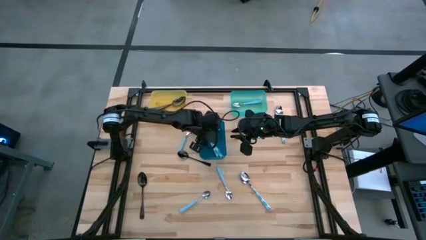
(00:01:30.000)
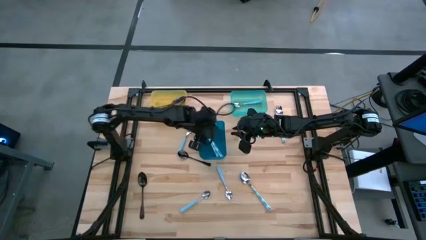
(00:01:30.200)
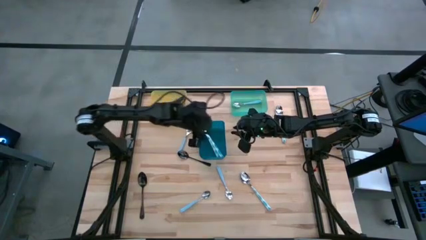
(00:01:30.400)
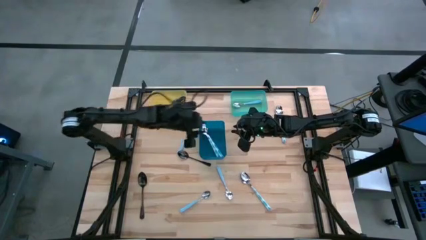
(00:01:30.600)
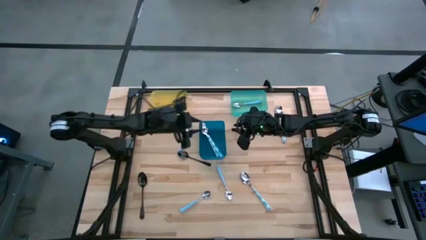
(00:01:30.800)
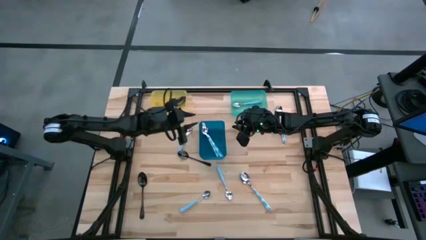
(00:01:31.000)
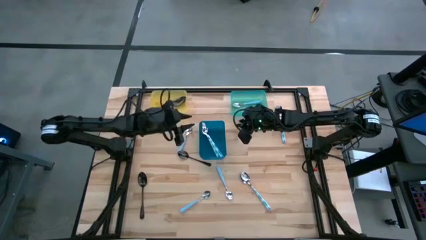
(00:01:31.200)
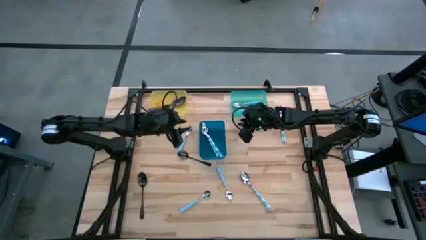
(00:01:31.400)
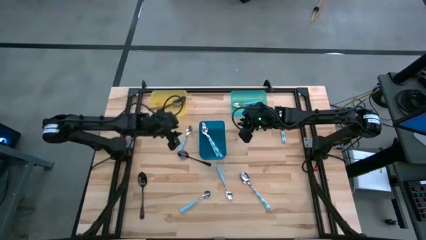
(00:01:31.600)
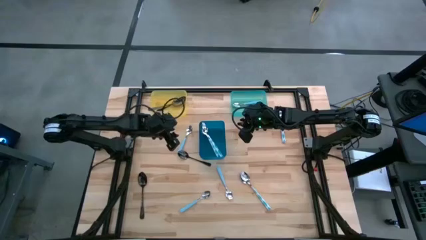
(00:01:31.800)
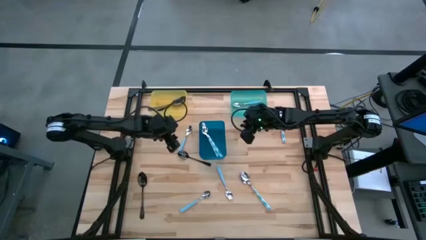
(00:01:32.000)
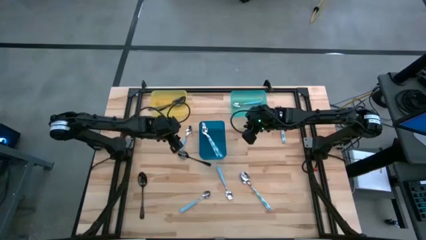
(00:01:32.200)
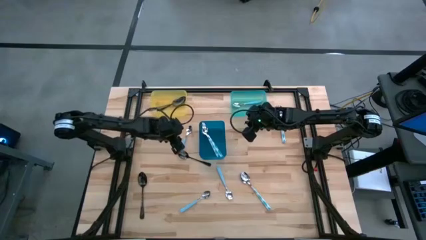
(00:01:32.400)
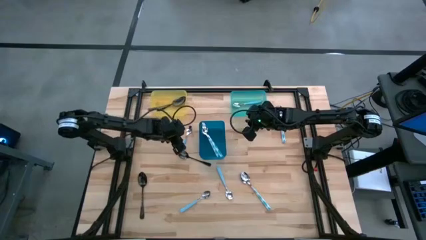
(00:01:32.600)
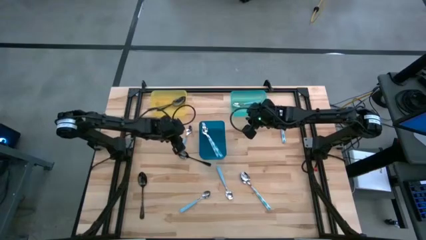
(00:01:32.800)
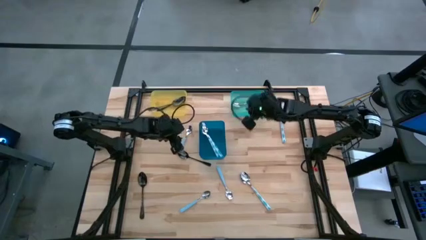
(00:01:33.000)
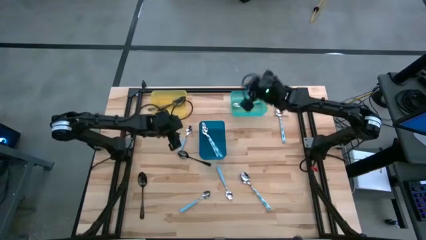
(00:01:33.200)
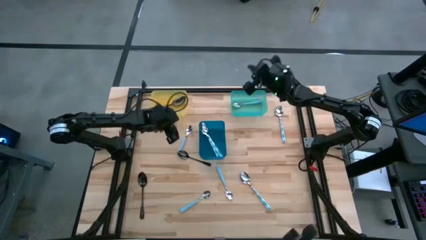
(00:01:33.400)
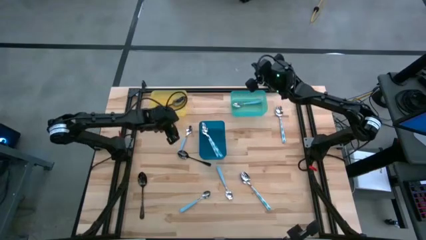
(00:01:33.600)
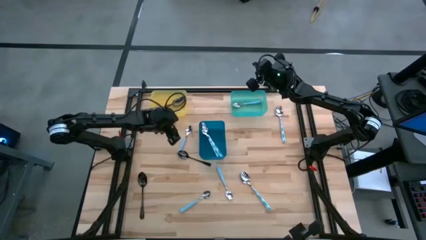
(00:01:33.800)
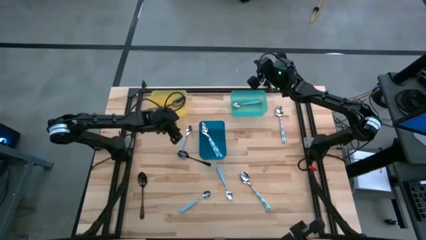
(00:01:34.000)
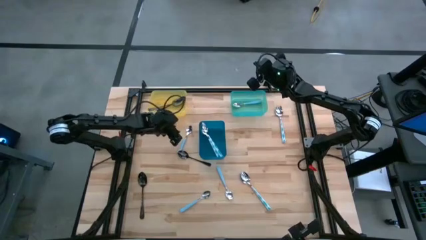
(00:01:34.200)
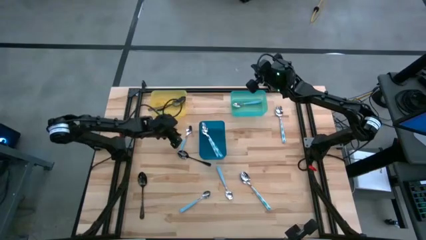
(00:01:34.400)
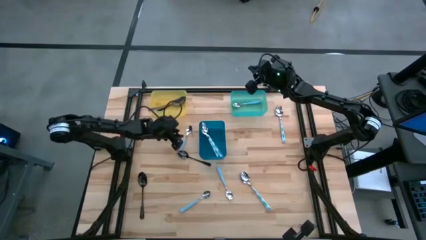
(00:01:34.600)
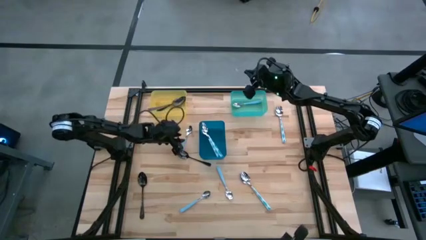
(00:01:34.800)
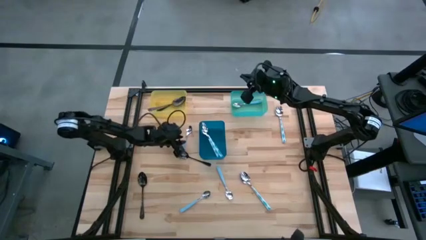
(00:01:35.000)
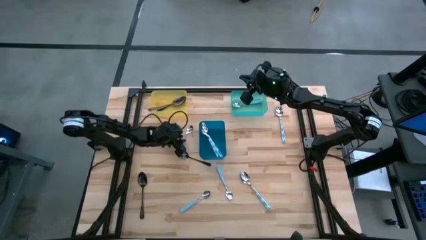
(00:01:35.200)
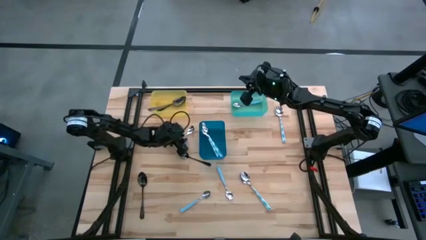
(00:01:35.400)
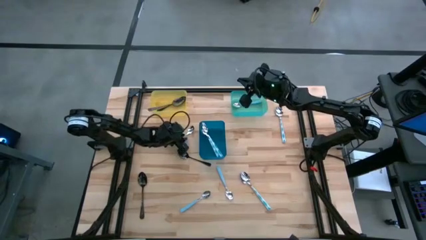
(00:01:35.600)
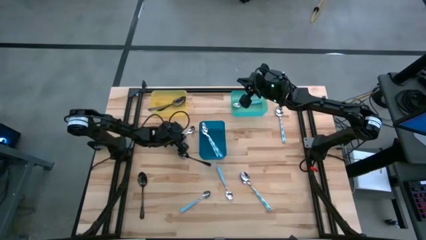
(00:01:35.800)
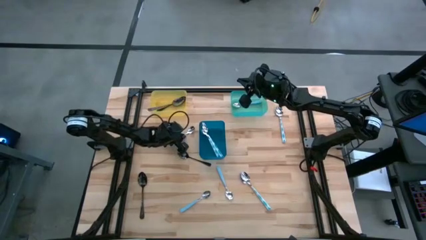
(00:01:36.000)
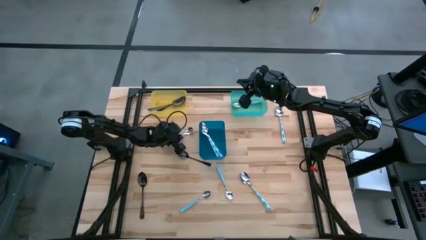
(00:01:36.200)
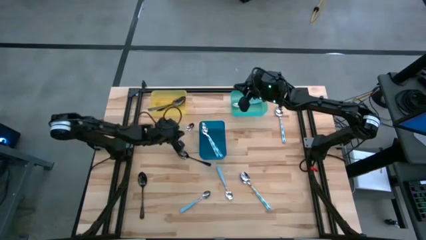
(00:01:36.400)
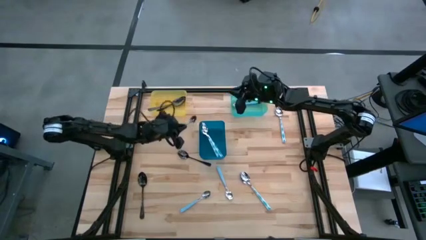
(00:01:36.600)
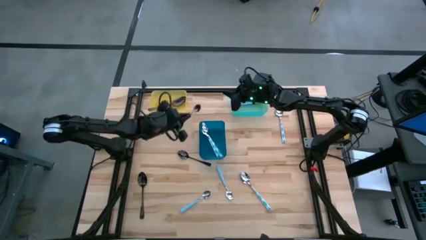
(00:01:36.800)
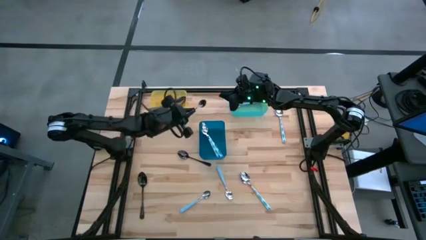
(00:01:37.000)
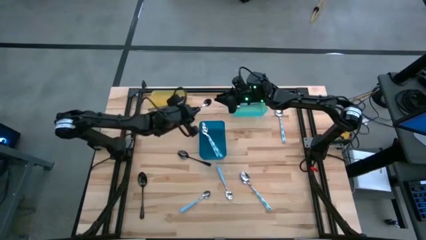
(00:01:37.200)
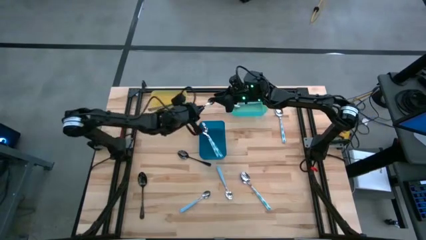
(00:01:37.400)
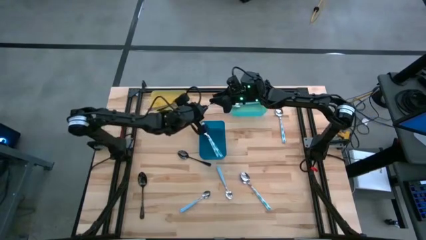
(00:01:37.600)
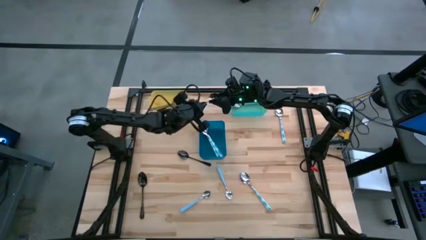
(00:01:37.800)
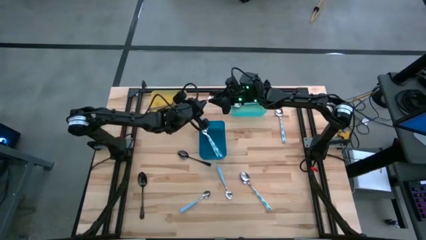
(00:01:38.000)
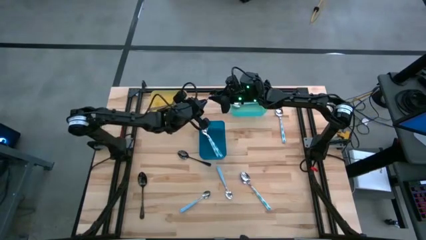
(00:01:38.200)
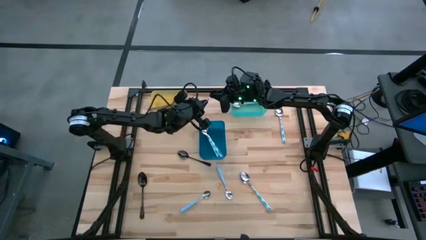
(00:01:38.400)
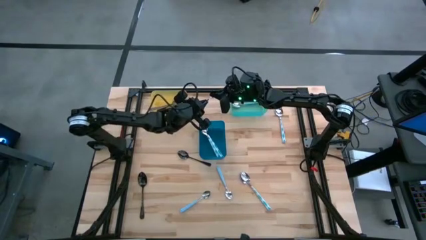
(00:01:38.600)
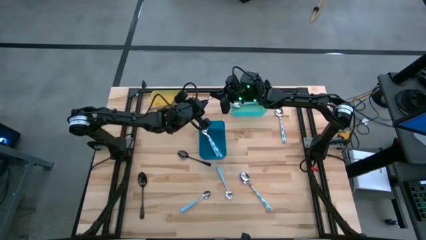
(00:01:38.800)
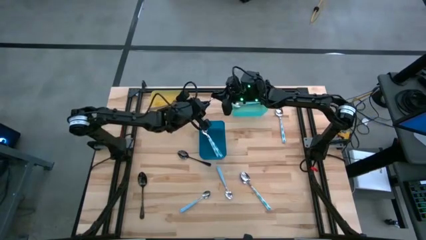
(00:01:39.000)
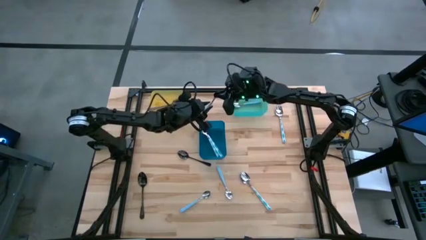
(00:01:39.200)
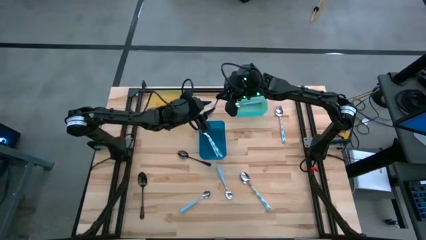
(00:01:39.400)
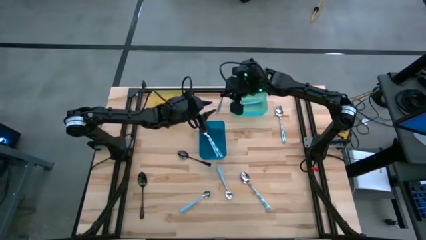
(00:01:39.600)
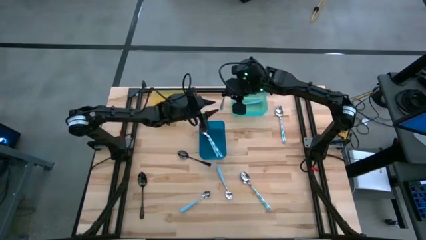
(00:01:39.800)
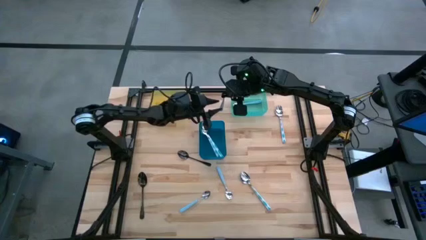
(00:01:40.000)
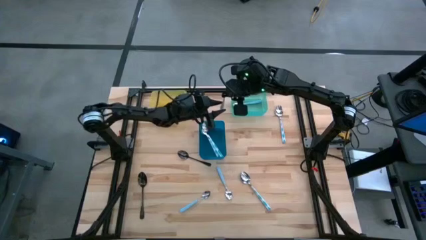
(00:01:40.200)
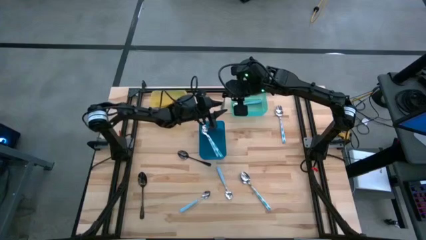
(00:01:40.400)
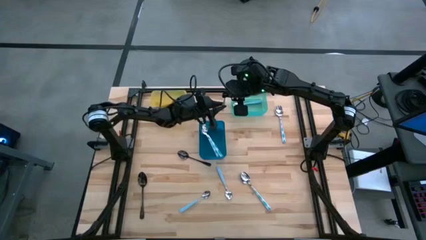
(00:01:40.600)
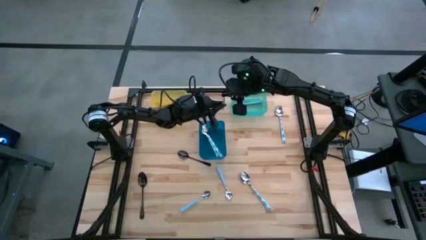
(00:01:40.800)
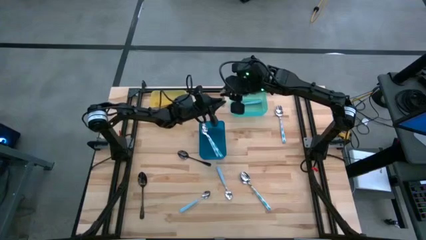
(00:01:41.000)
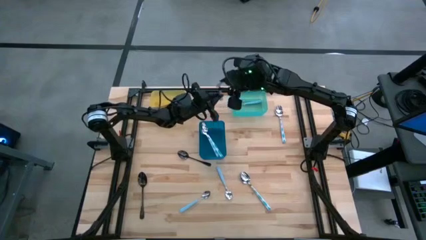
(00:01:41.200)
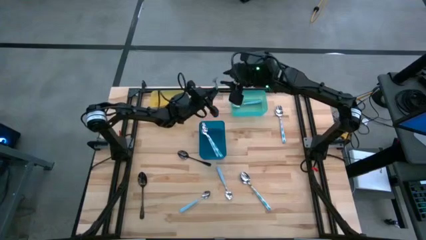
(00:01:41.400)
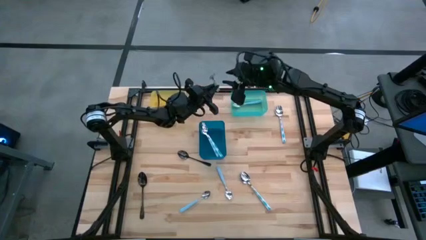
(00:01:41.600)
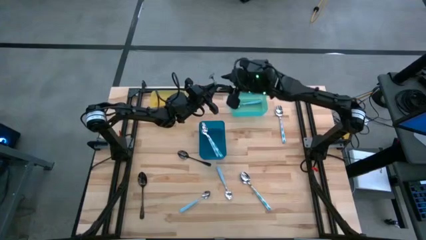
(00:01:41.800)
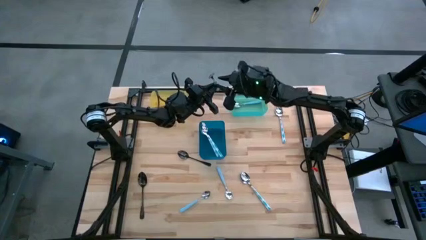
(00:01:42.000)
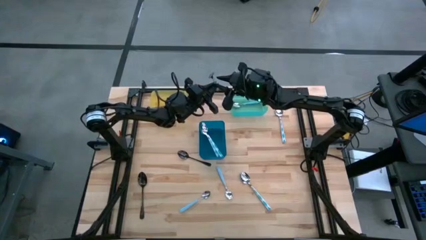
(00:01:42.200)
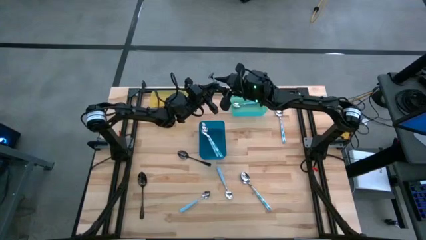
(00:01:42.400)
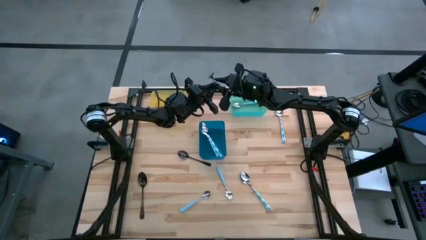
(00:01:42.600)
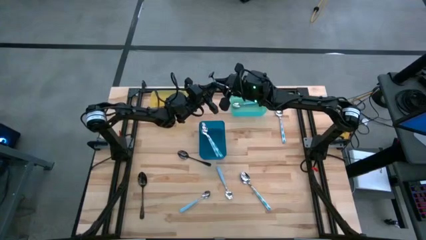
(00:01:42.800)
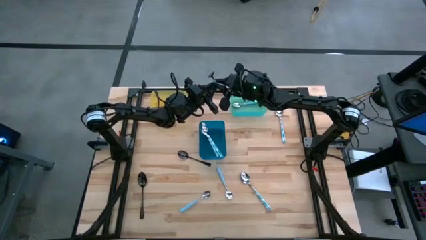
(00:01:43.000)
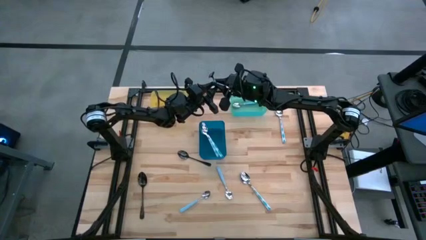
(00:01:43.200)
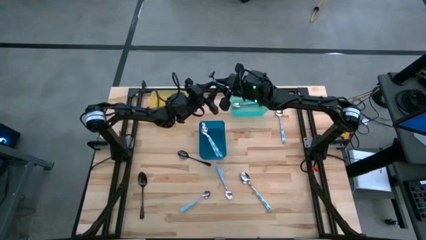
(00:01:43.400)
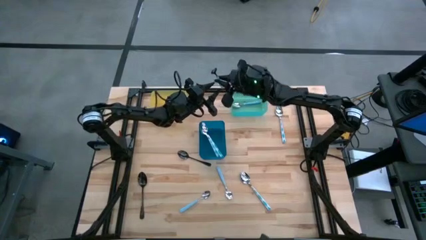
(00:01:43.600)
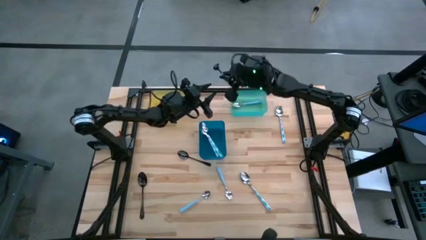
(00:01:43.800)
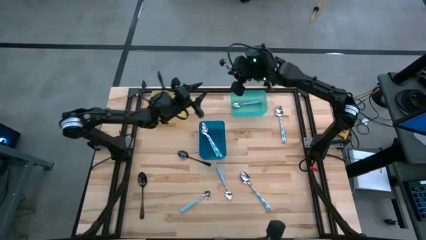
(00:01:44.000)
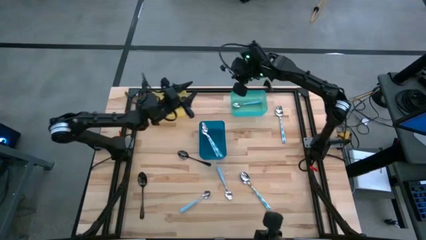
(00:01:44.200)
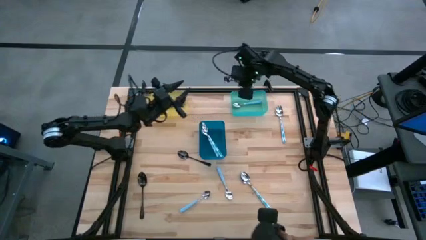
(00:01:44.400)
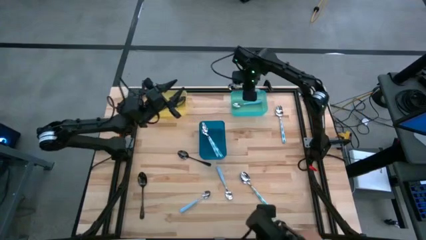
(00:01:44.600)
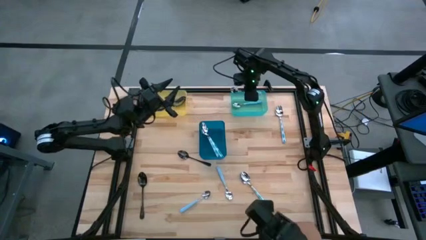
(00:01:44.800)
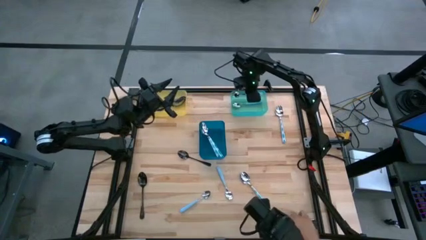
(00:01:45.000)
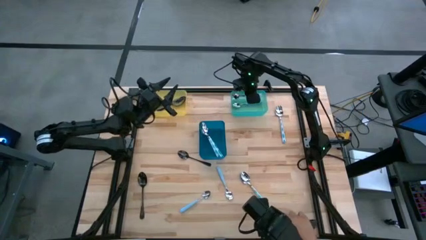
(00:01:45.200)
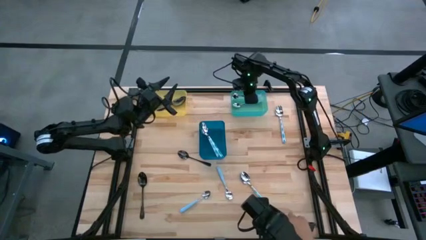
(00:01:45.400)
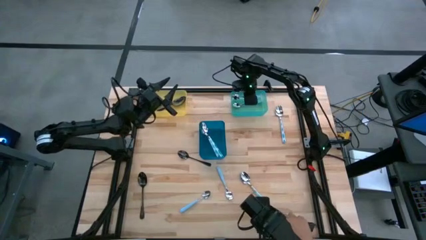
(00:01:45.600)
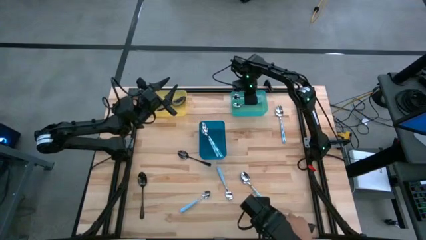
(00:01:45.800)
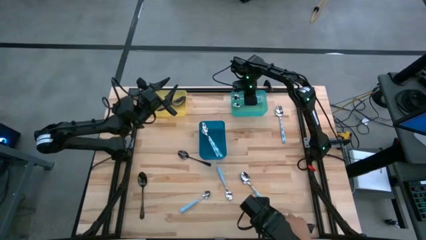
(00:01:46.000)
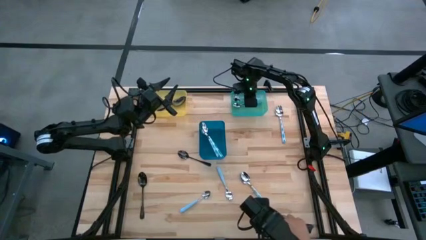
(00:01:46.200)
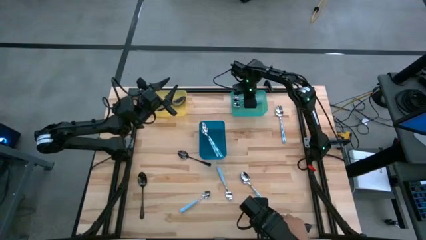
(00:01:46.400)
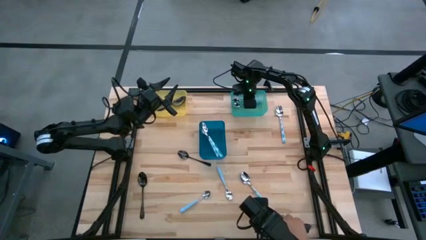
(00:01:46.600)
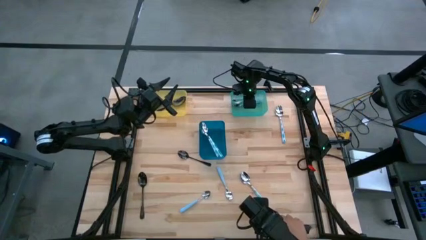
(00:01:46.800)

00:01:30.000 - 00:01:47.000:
Task: Sort silverware by color (type)
Put the light blue spoon into the light blue bin
